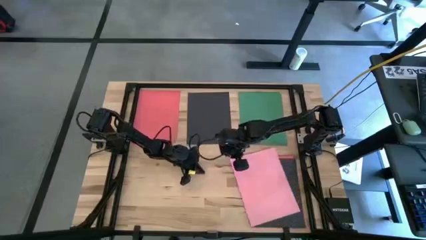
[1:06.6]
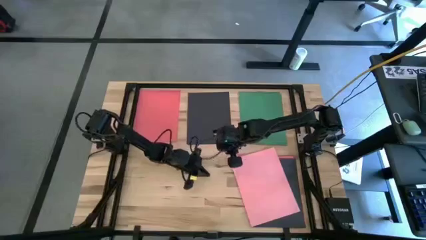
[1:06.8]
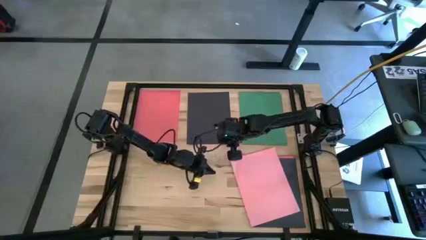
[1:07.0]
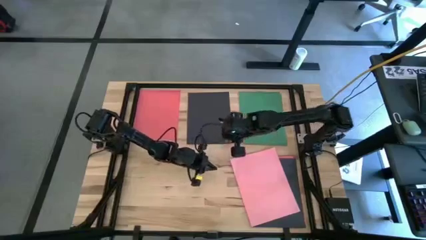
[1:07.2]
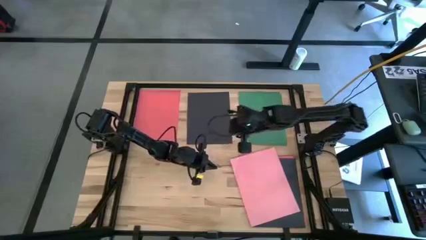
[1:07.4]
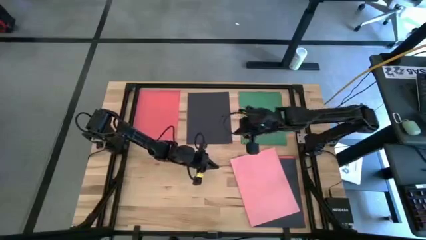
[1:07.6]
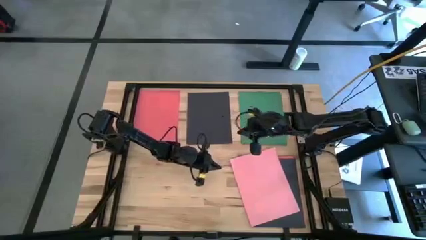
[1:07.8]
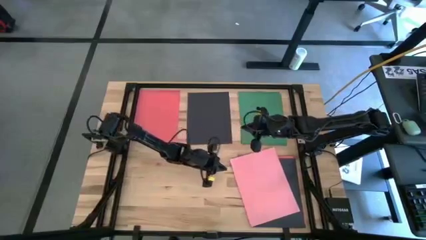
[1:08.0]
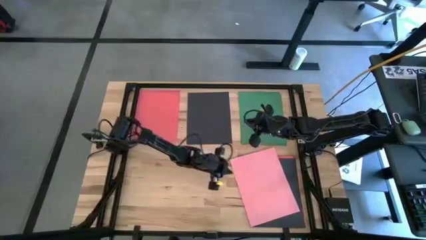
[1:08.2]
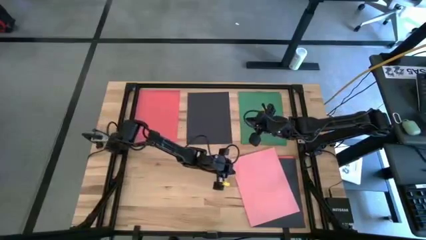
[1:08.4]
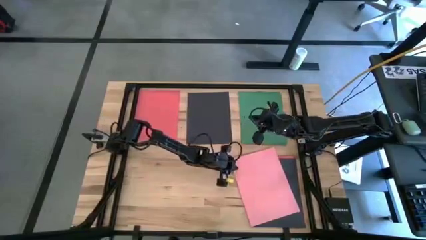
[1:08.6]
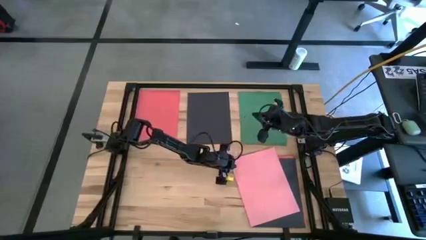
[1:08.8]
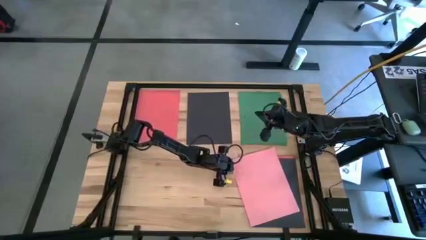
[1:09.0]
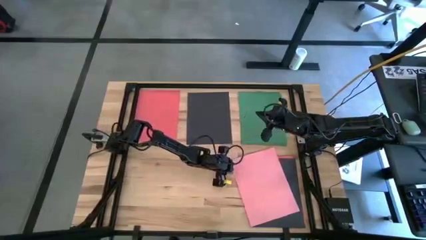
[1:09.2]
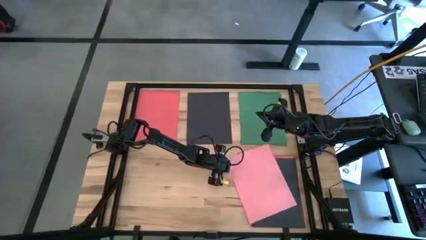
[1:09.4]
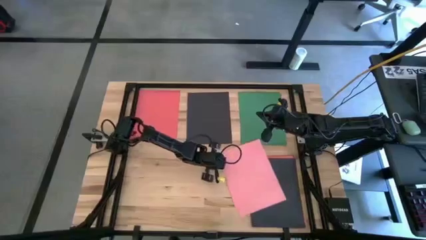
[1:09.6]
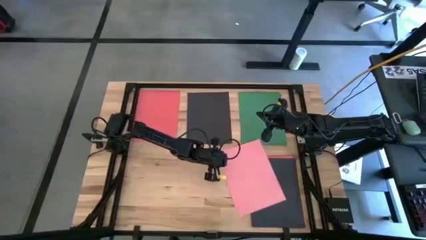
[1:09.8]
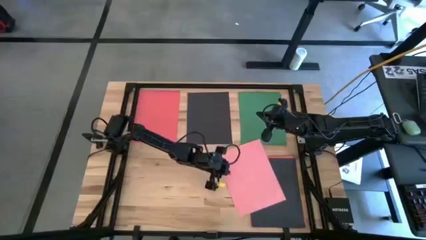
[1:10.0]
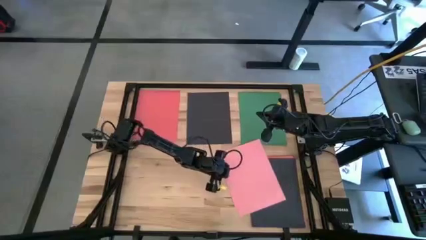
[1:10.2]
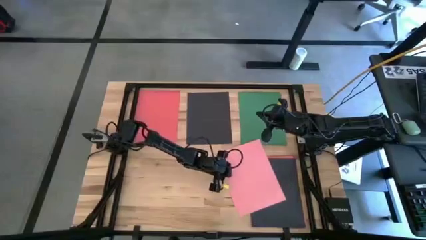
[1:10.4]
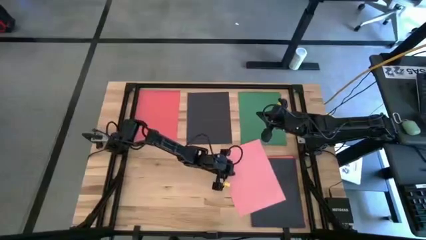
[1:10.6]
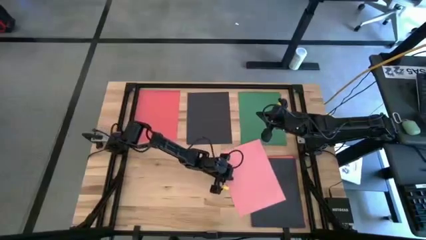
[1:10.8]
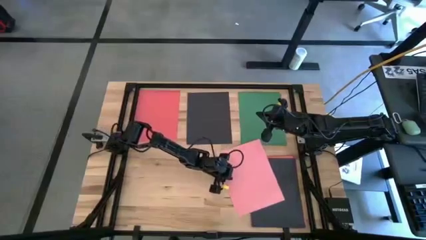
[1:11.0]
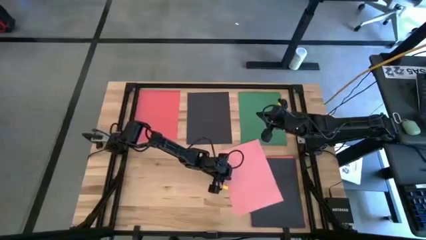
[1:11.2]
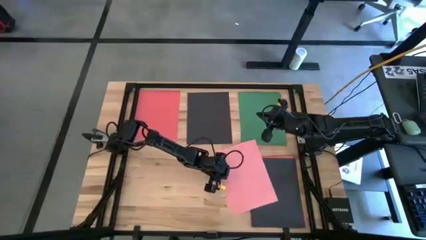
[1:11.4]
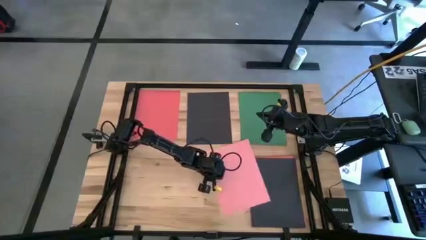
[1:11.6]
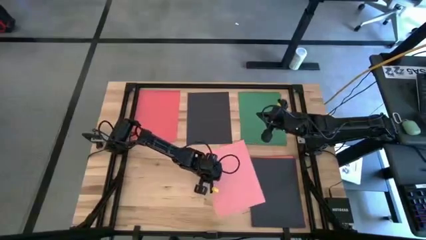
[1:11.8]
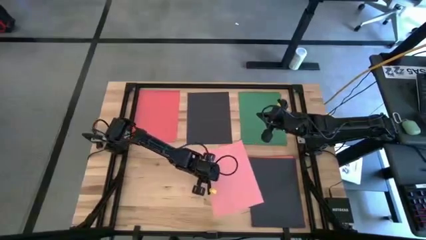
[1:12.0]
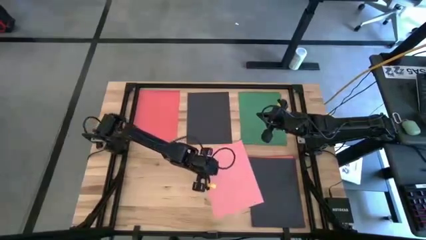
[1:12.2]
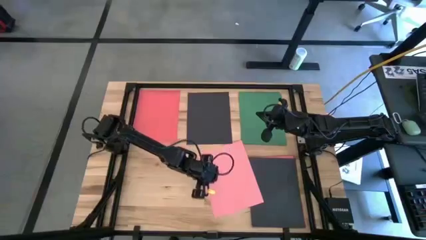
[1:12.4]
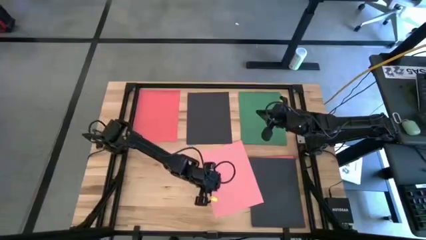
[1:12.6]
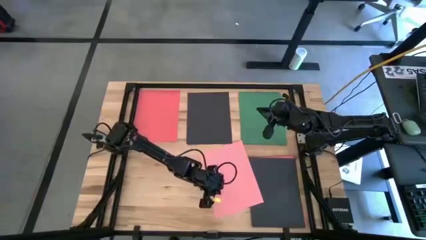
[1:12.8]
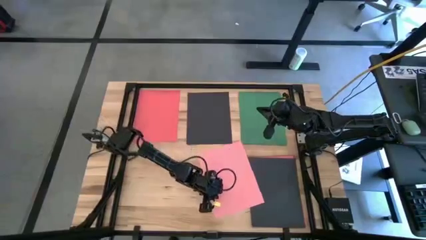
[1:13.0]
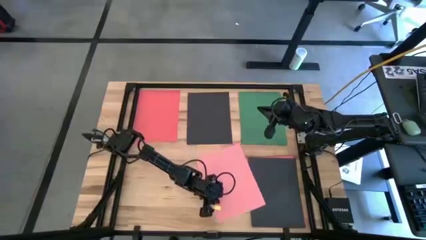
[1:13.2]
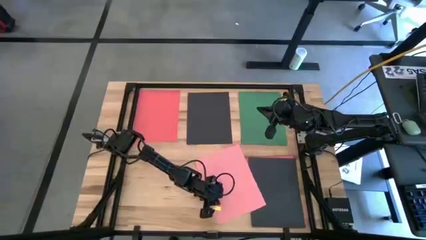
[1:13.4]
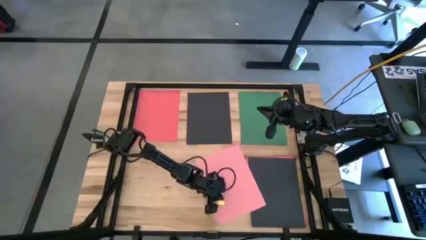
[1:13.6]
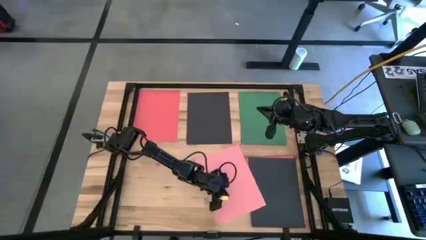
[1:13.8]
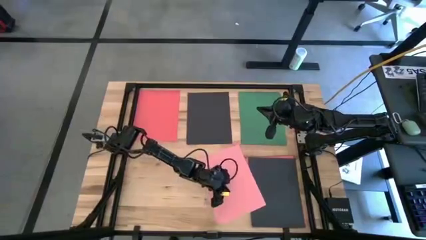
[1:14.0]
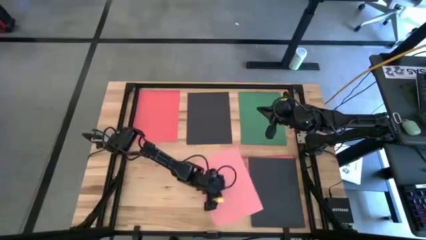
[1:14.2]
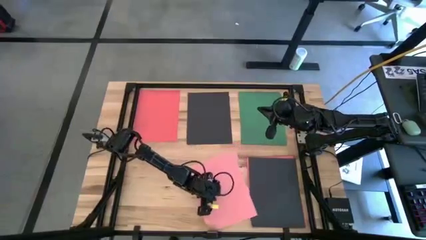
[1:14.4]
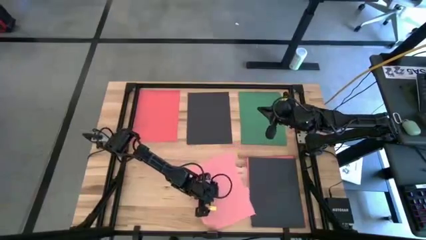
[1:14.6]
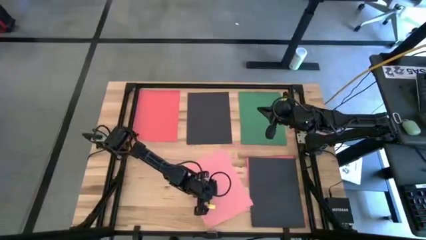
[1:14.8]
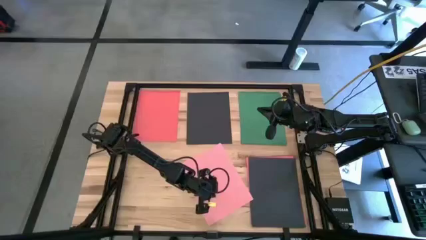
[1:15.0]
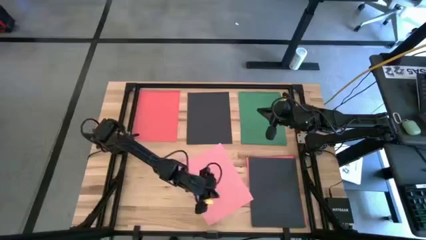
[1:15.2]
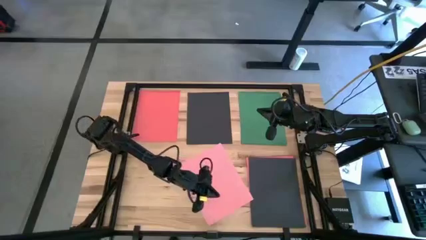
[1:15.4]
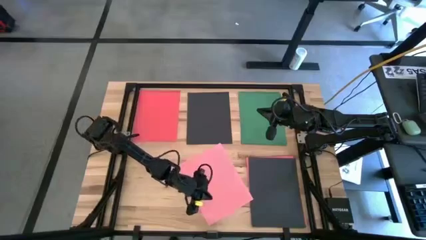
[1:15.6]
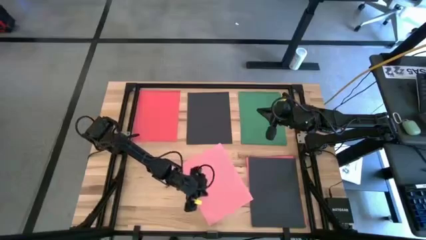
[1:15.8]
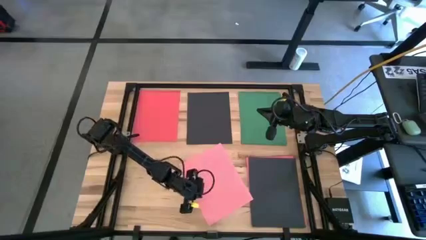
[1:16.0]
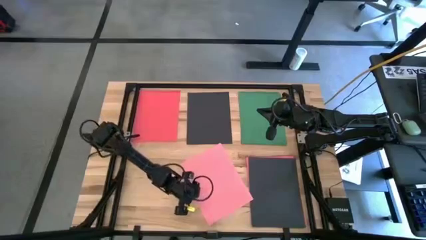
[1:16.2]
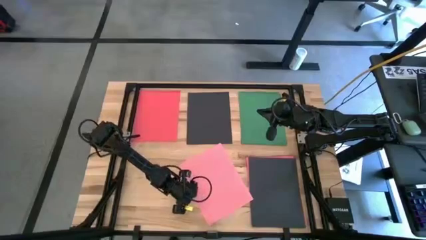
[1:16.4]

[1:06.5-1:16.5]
Task: Organize paper
Move the pink paper to the bottom left of the table
